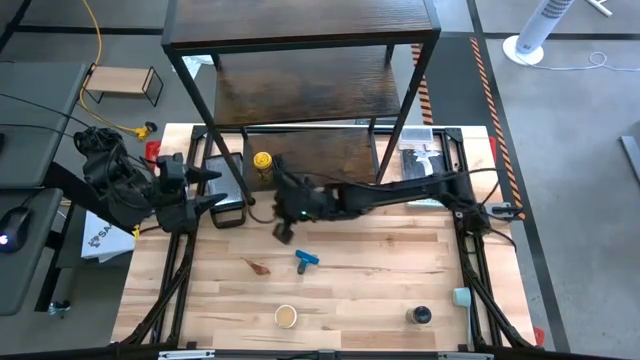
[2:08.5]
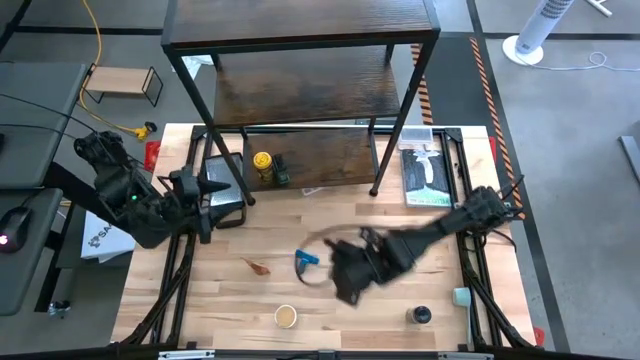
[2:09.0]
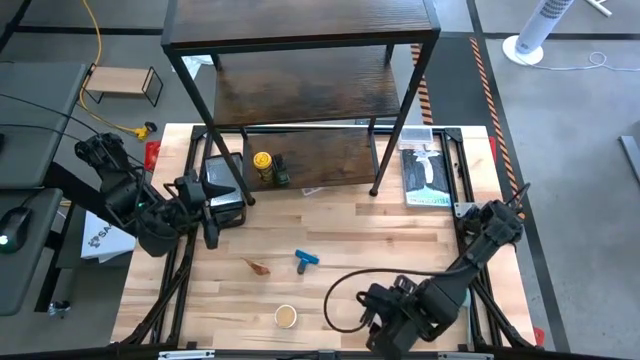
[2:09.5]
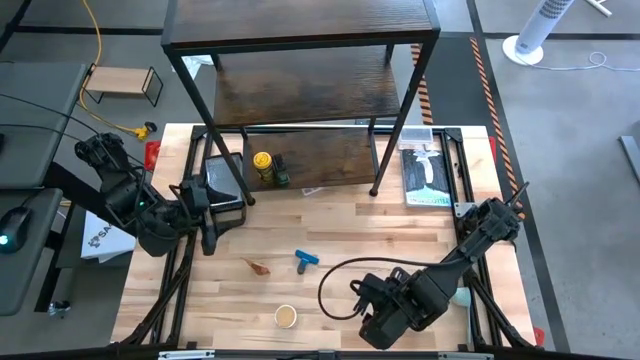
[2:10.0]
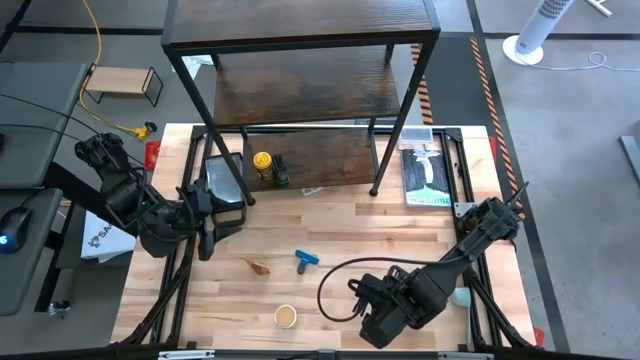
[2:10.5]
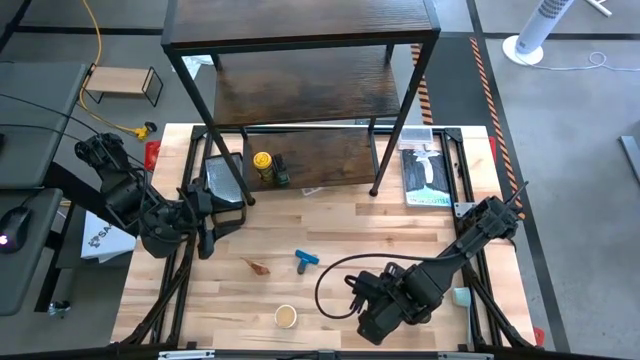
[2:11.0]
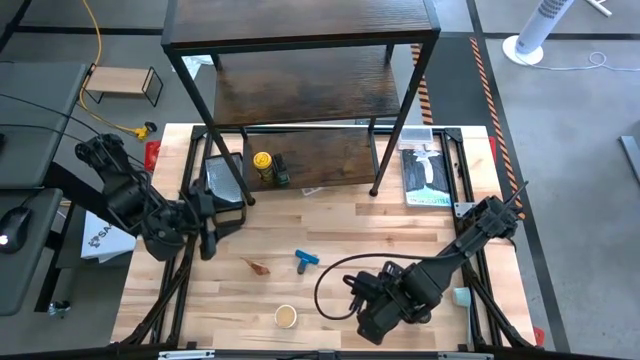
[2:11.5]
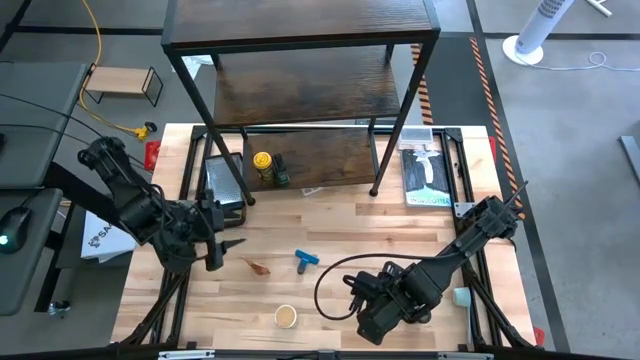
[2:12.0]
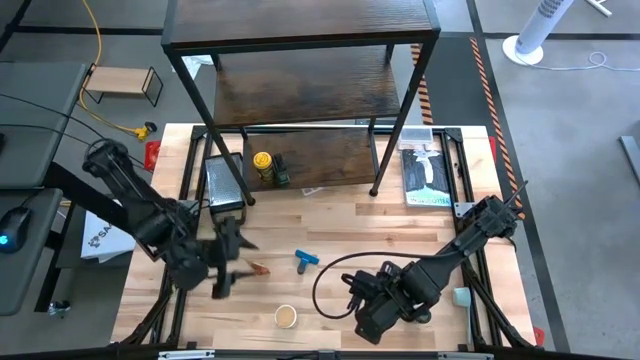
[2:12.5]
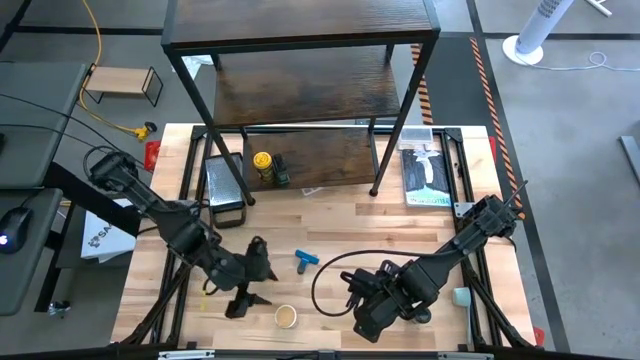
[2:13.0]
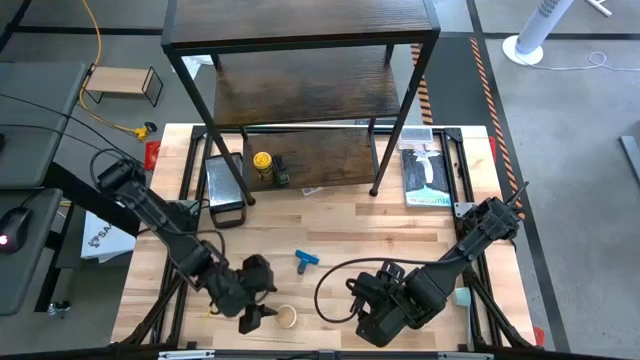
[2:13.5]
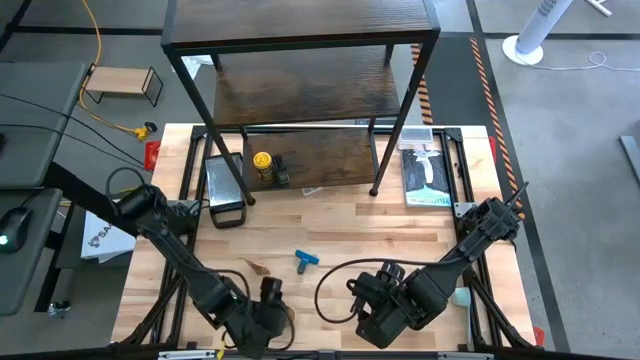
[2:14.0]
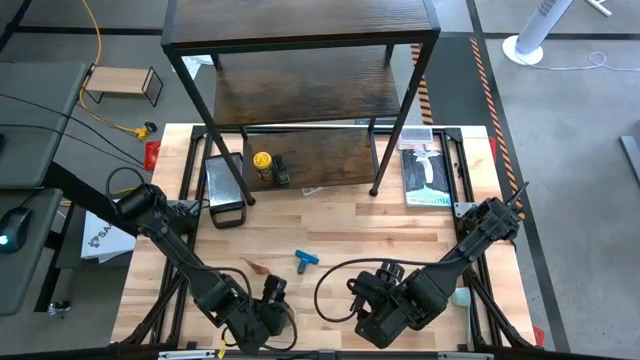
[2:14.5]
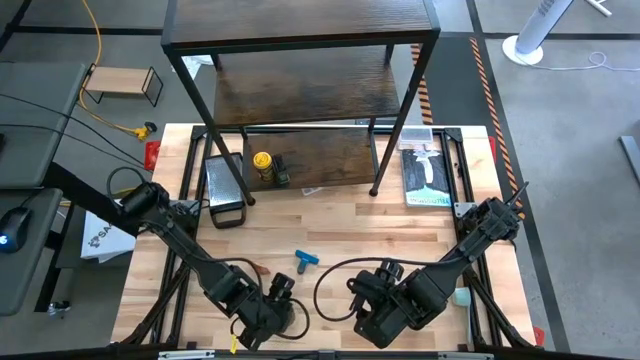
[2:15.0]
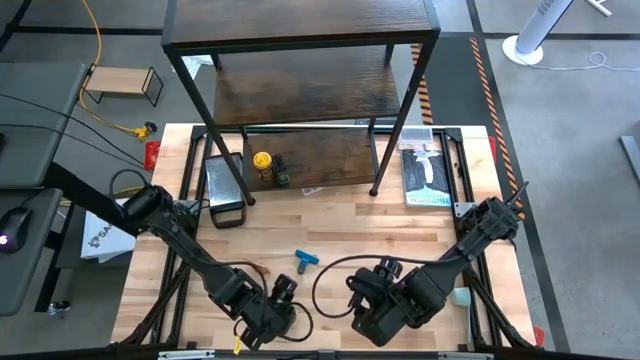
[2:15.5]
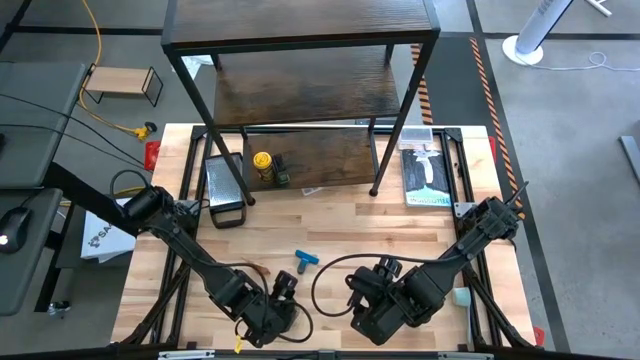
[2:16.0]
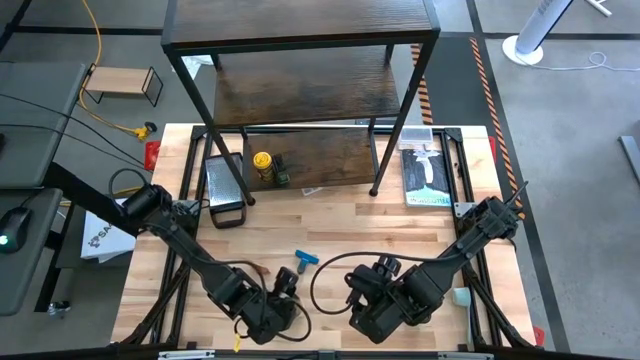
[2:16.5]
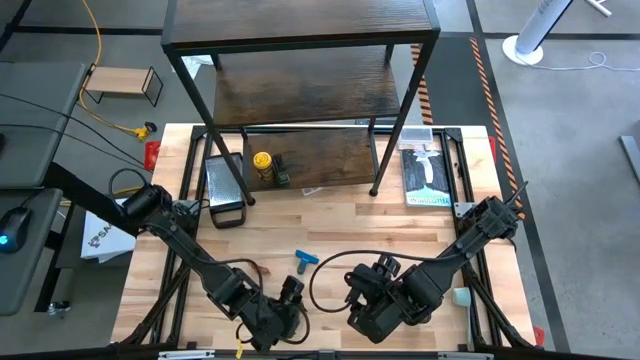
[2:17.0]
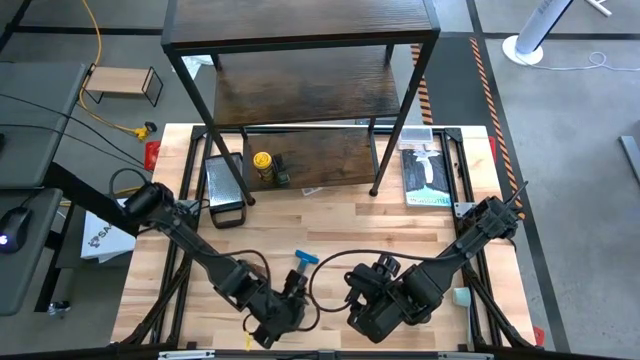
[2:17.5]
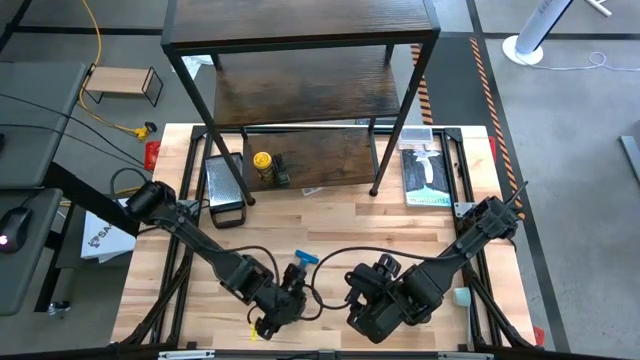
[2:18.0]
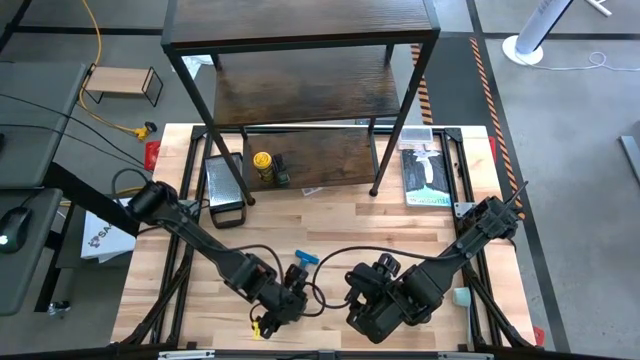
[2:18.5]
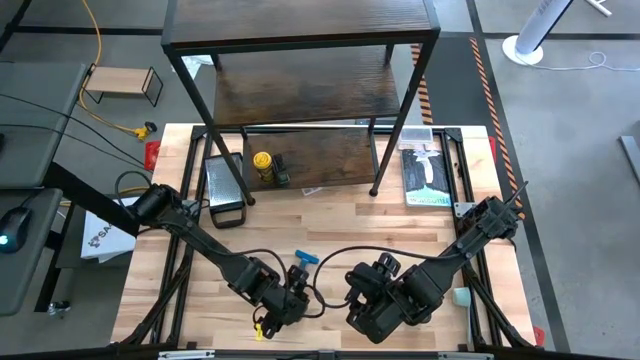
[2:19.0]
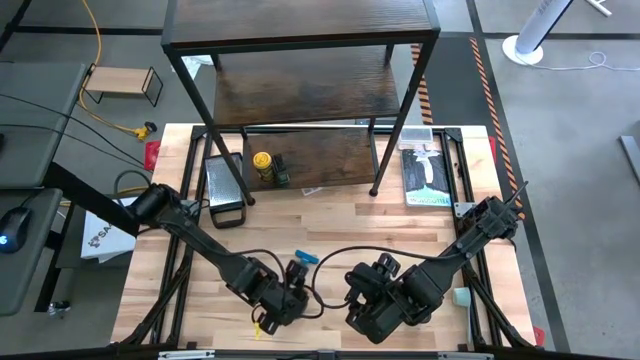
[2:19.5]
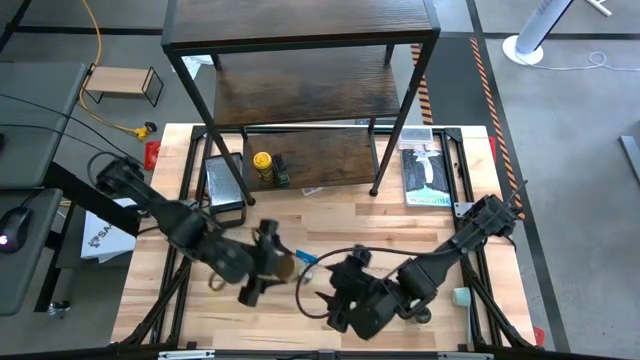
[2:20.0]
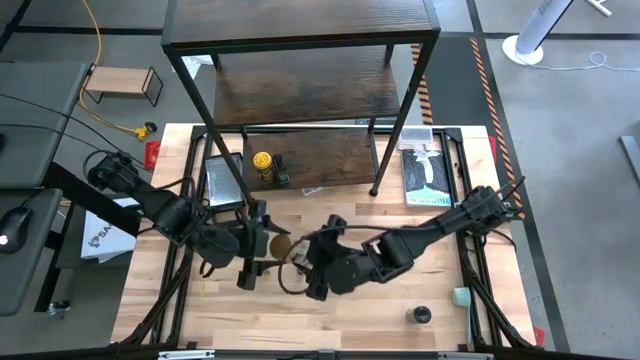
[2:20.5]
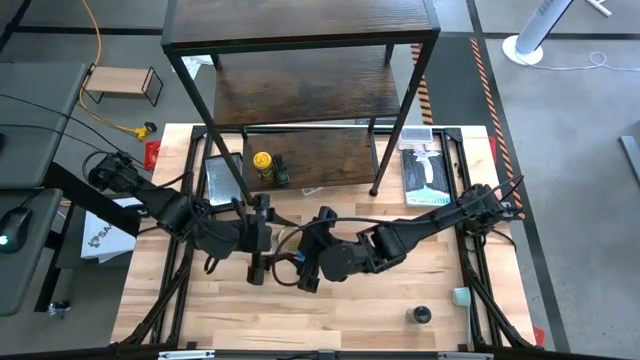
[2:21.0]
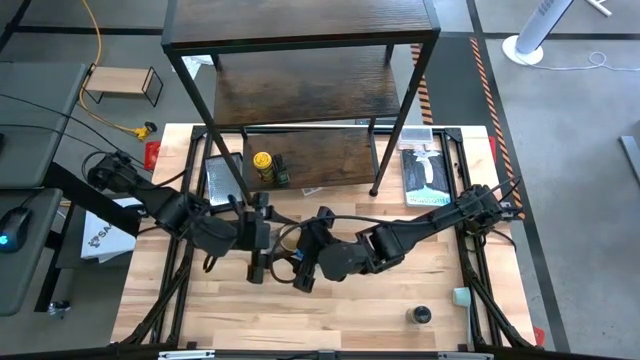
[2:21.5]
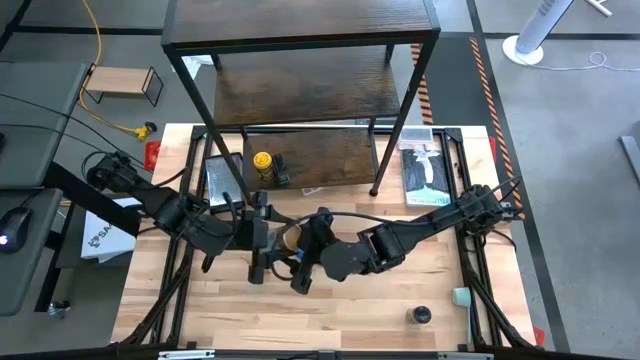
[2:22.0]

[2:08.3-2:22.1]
Task: Shelf spices
Put the brown seasoning bottle on the shelf

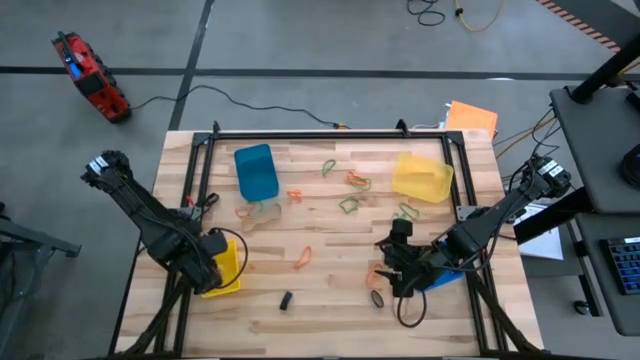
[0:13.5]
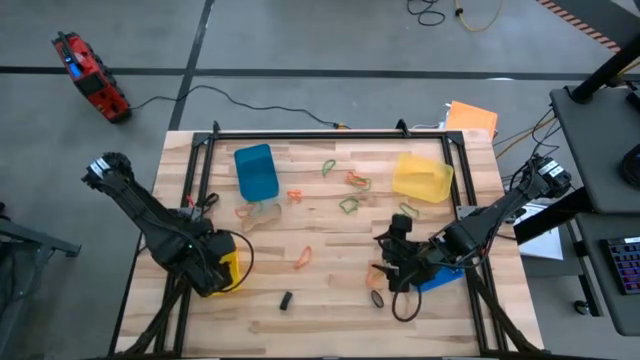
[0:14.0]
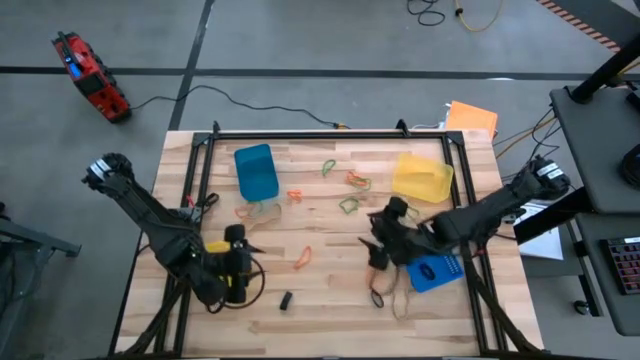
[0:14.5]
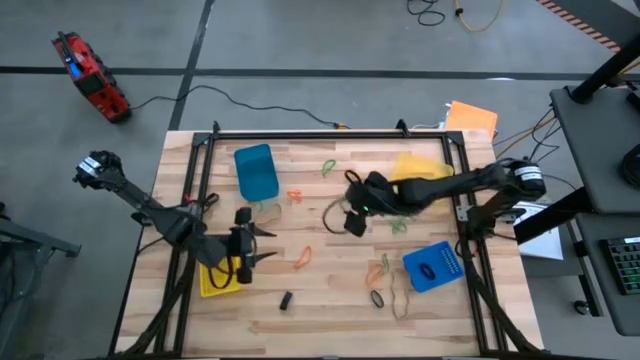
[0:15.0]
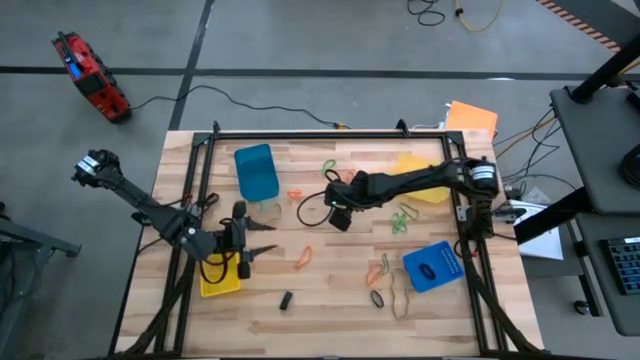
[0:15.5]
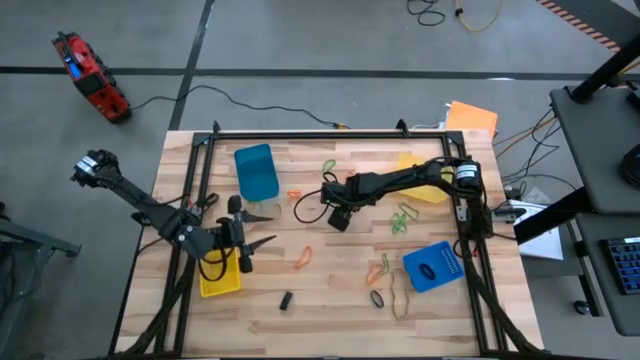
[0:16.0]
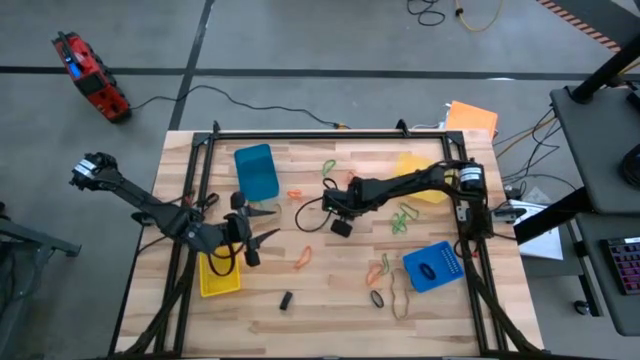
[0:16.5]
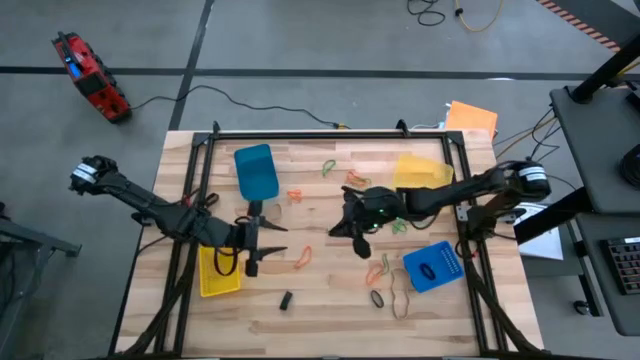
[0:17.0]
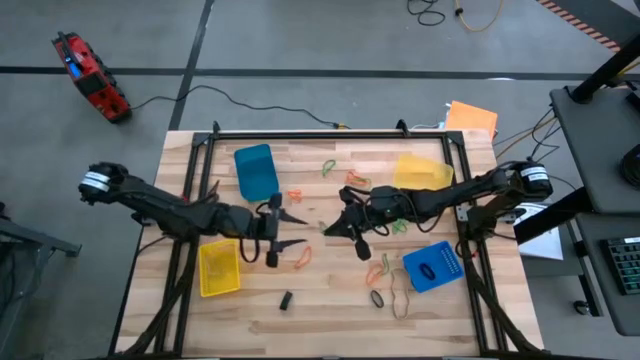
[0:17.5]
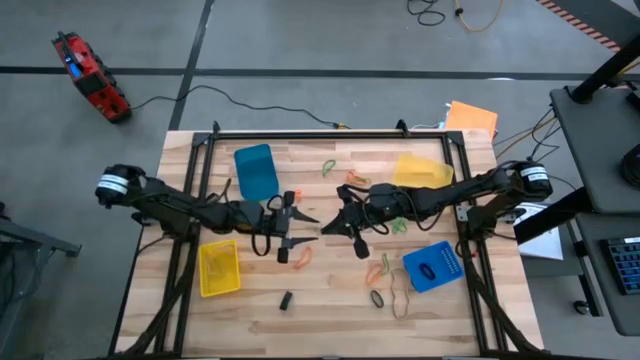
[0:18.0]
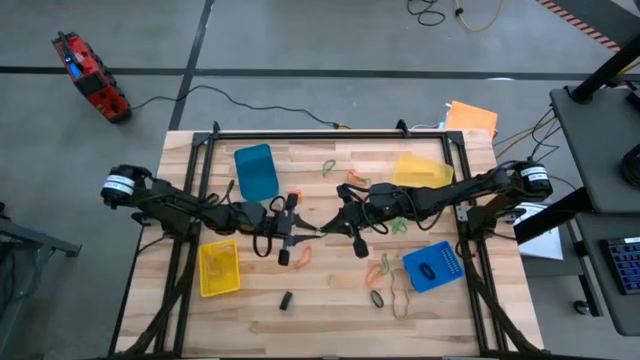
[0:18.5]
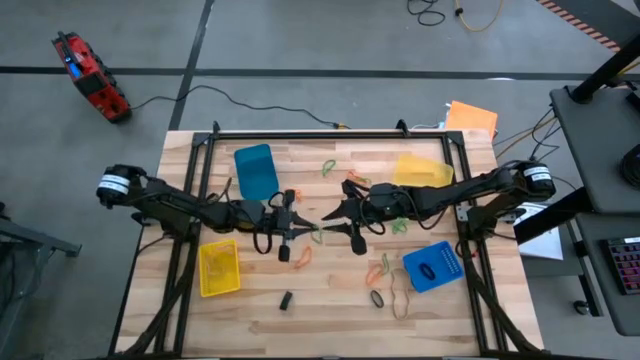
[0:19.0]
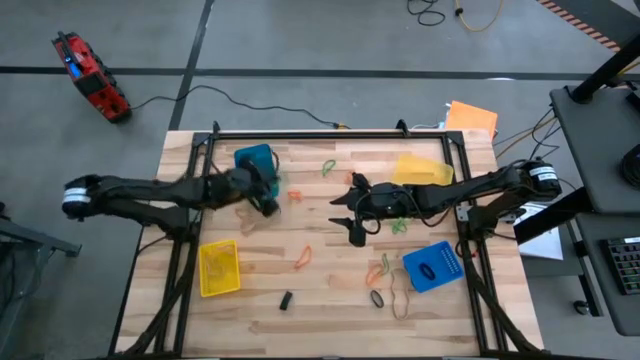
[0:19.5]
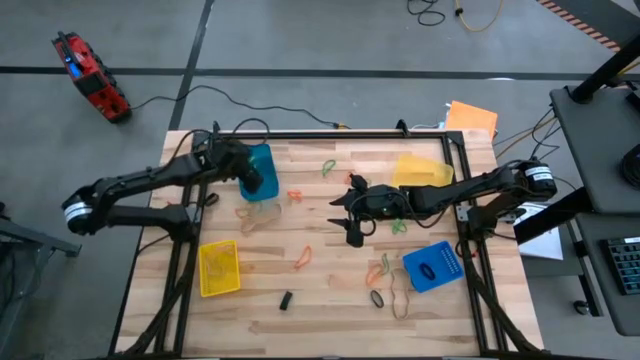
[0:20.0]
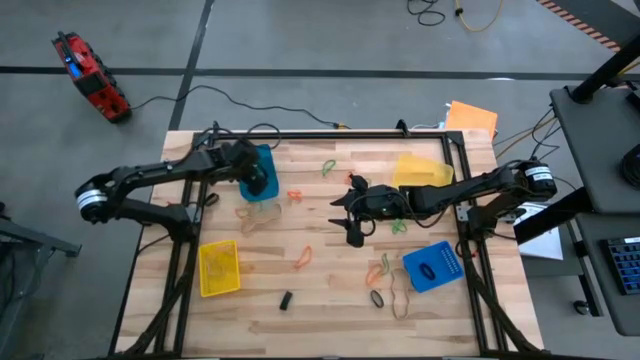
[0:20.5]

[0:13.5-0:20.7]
Task: Sort rubber bands into baskets
Put the green rubber band into the top blue bin

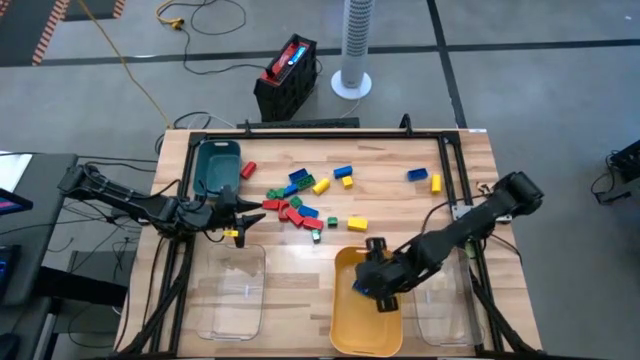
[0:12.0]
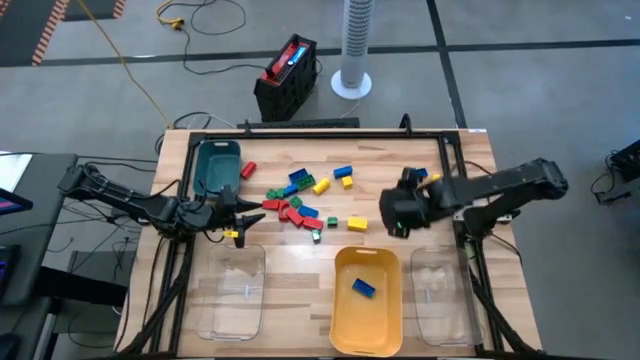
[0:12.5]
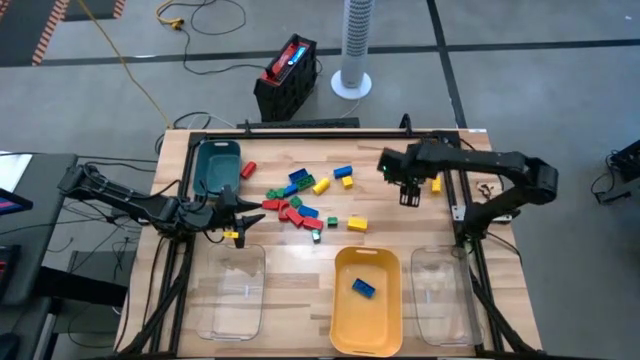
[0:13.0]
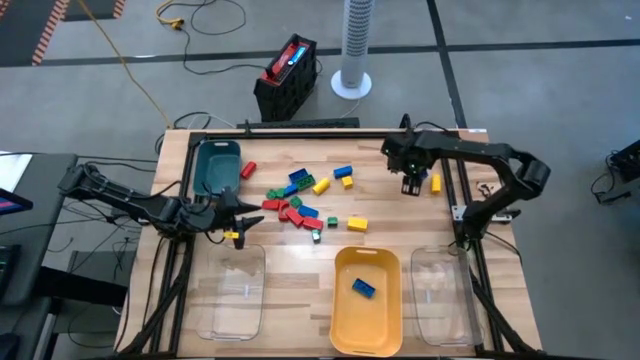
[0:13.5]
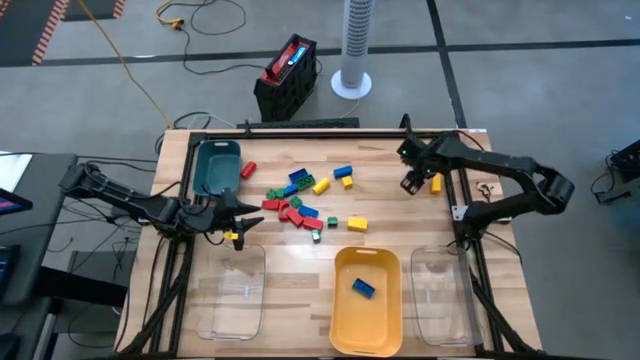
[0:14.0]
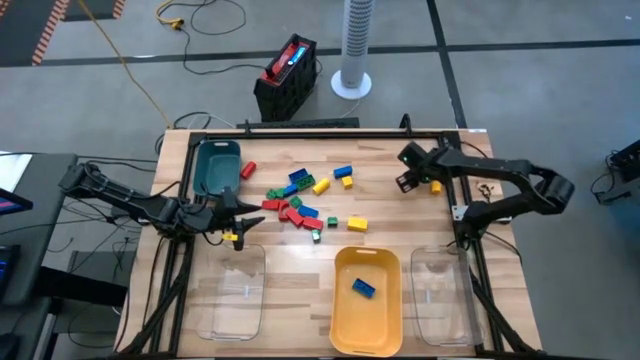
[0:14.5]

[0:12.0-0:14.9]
Task: Sort blocks
Put the yellow wooden block into the right transparent bin
